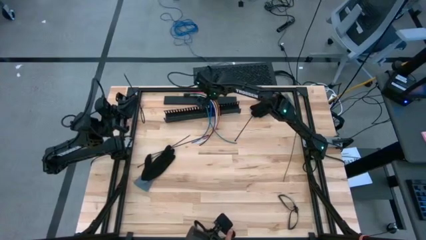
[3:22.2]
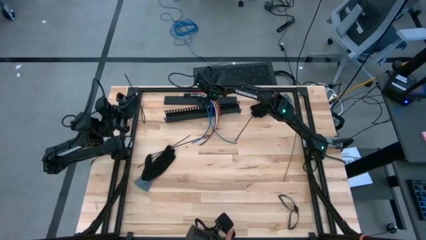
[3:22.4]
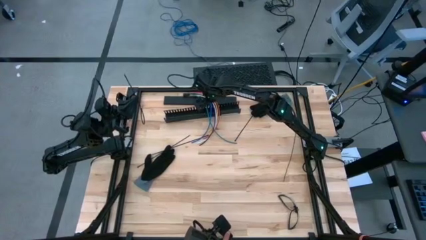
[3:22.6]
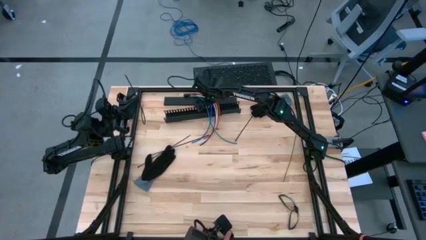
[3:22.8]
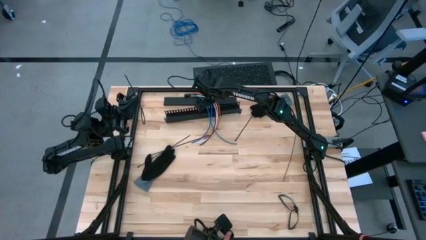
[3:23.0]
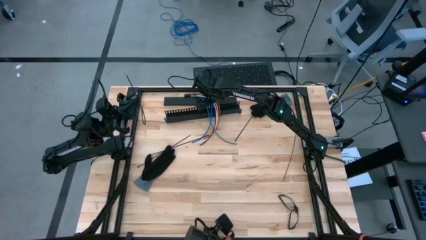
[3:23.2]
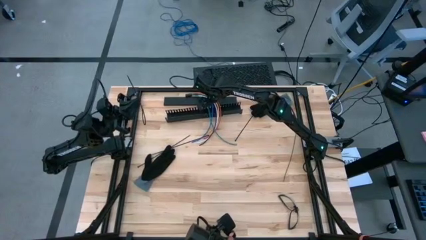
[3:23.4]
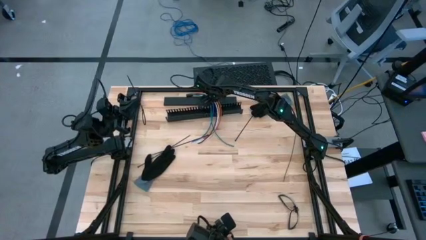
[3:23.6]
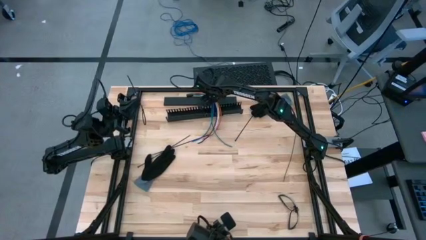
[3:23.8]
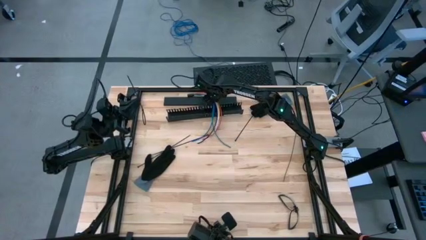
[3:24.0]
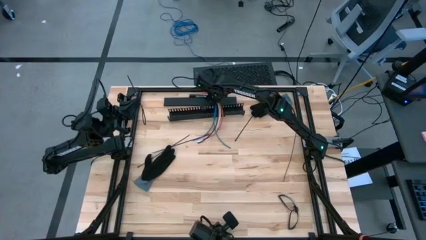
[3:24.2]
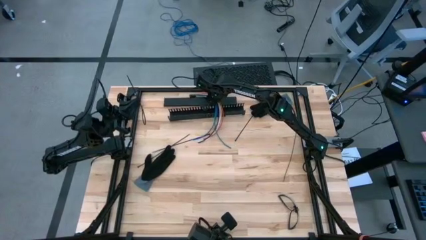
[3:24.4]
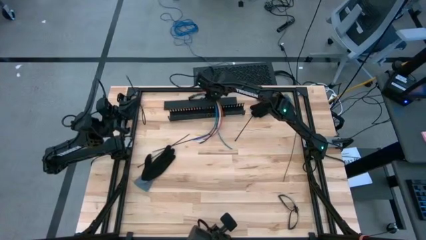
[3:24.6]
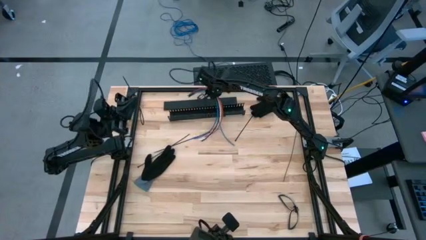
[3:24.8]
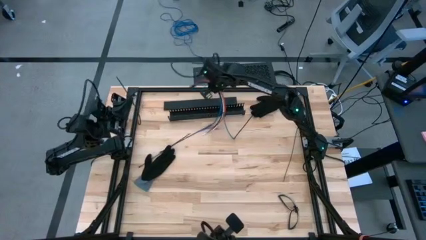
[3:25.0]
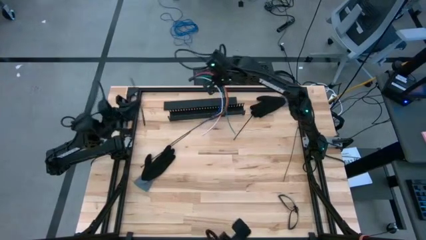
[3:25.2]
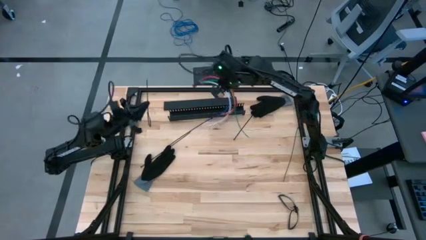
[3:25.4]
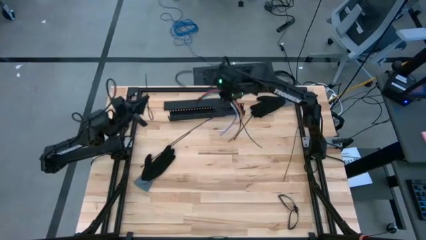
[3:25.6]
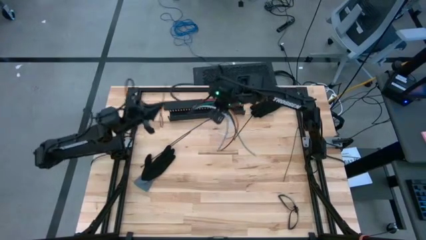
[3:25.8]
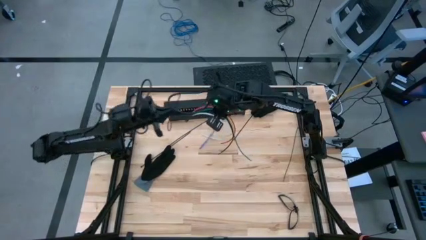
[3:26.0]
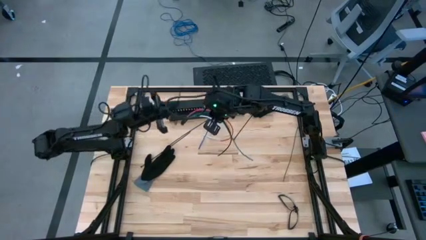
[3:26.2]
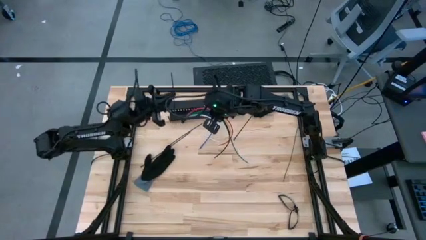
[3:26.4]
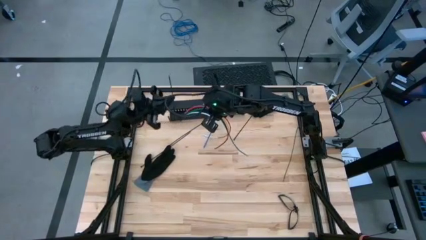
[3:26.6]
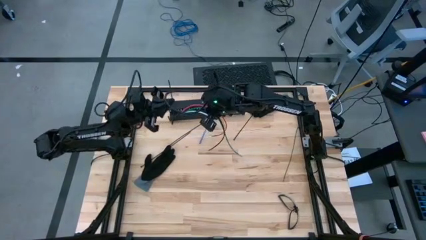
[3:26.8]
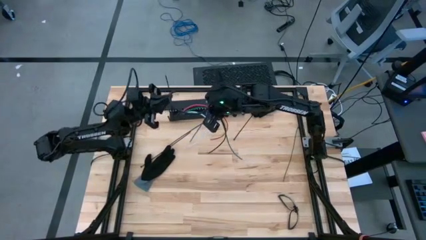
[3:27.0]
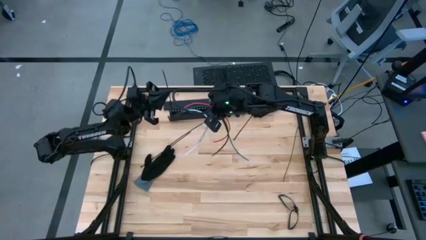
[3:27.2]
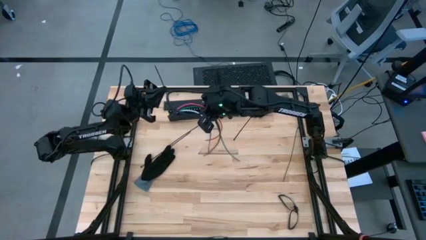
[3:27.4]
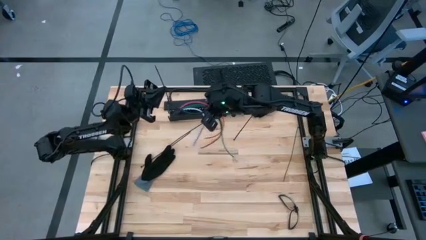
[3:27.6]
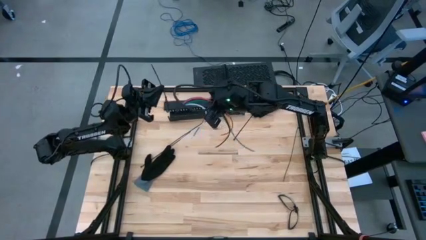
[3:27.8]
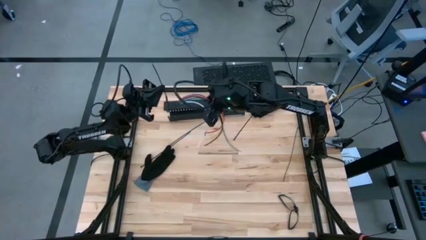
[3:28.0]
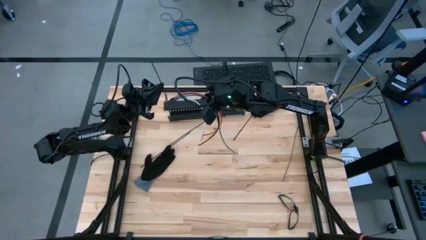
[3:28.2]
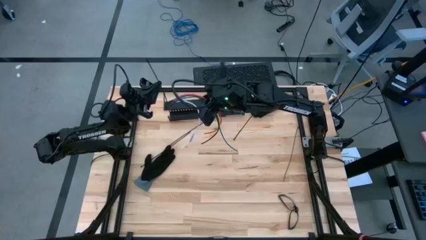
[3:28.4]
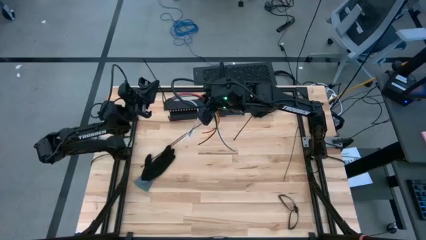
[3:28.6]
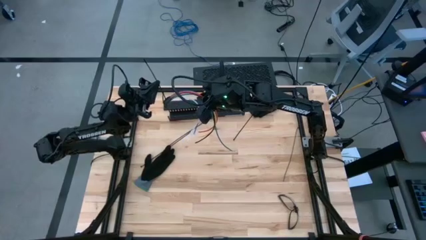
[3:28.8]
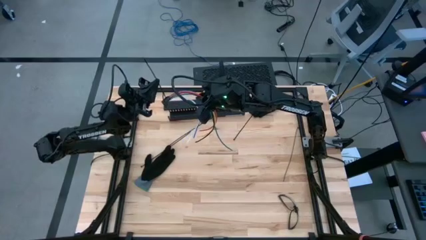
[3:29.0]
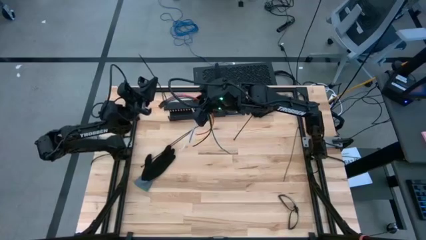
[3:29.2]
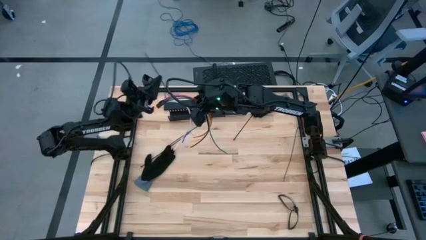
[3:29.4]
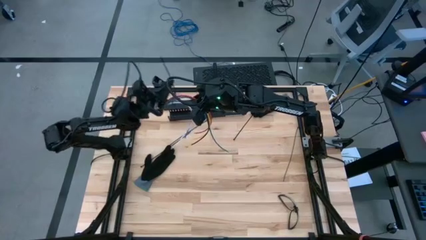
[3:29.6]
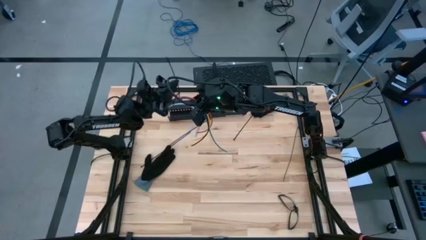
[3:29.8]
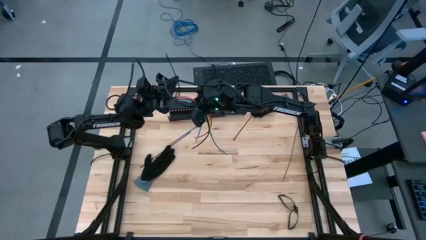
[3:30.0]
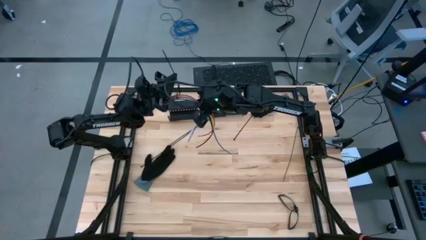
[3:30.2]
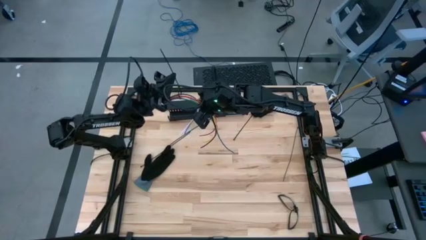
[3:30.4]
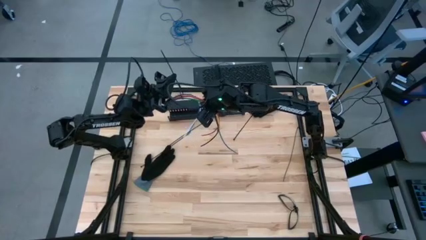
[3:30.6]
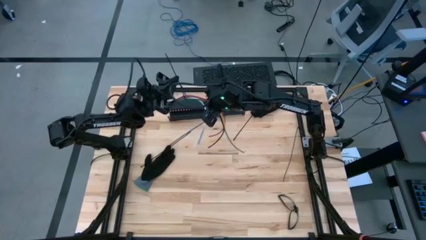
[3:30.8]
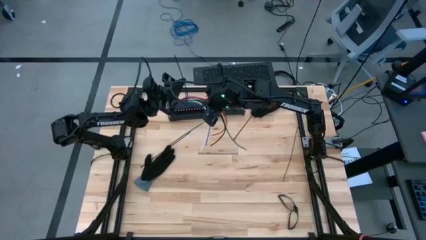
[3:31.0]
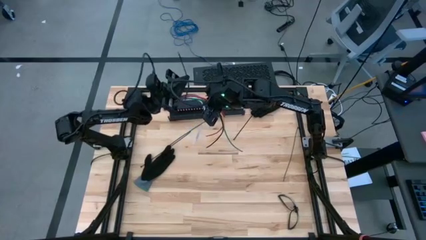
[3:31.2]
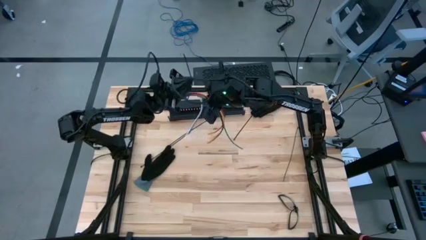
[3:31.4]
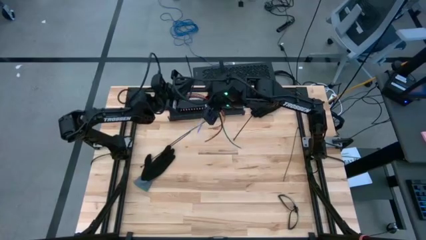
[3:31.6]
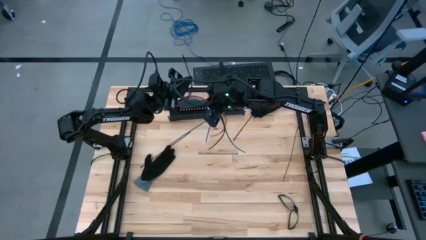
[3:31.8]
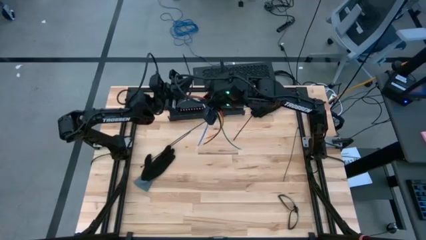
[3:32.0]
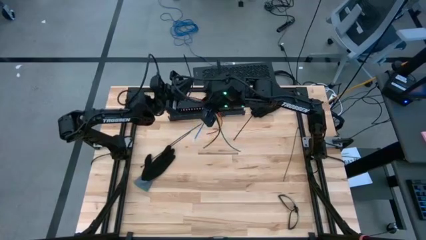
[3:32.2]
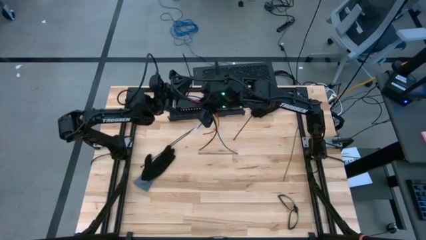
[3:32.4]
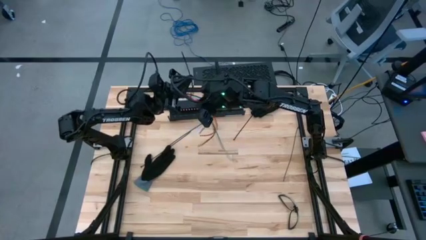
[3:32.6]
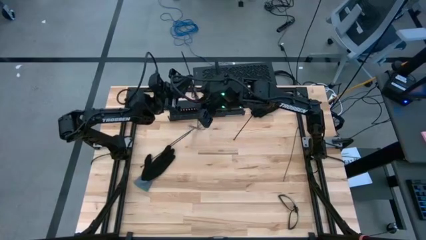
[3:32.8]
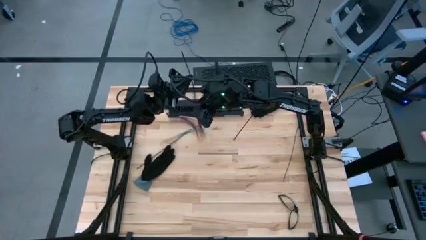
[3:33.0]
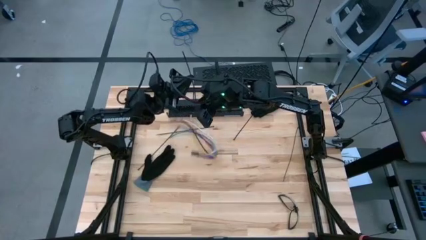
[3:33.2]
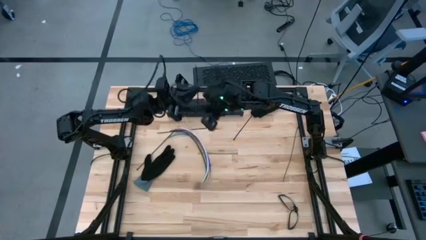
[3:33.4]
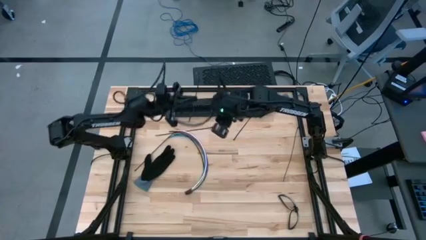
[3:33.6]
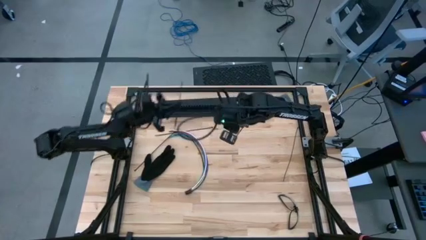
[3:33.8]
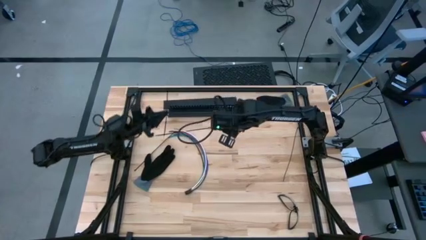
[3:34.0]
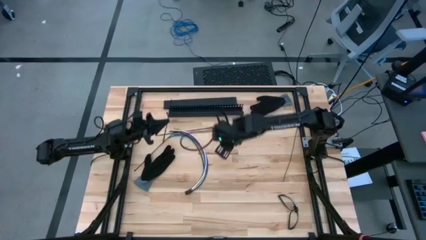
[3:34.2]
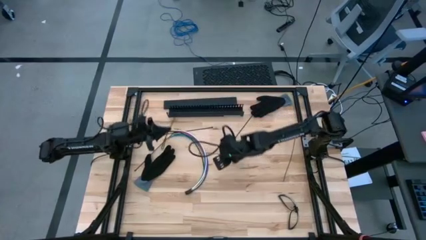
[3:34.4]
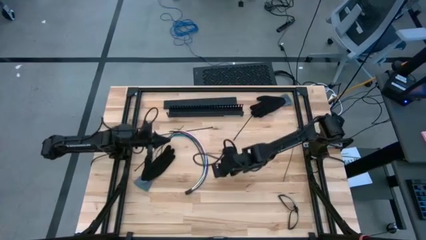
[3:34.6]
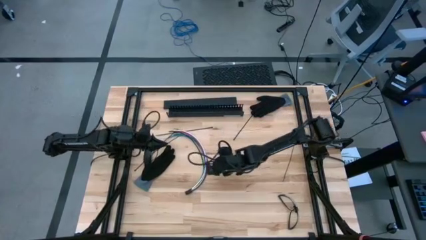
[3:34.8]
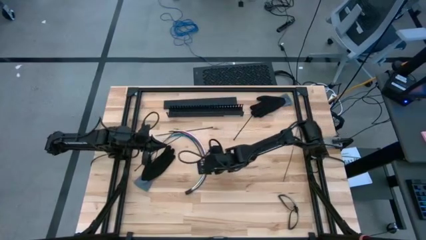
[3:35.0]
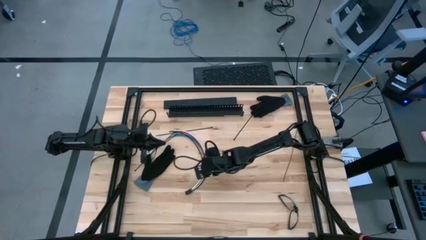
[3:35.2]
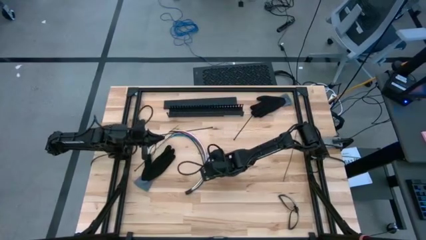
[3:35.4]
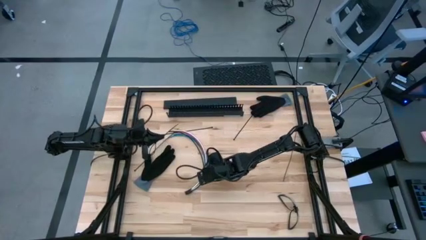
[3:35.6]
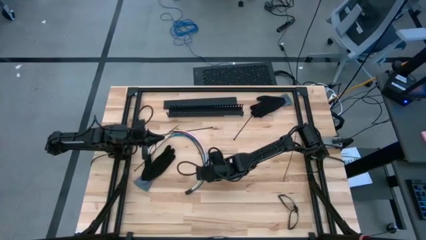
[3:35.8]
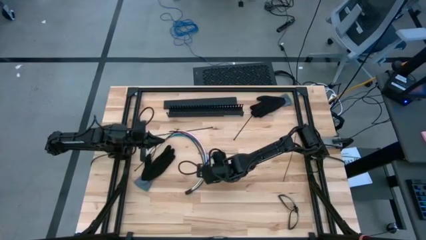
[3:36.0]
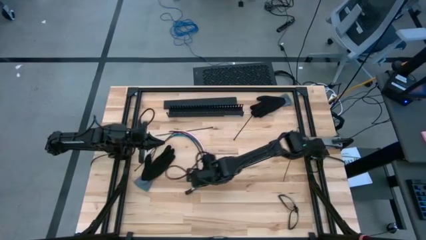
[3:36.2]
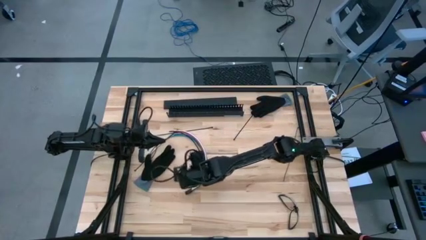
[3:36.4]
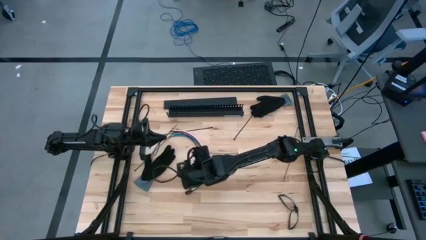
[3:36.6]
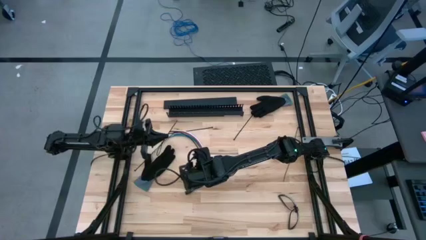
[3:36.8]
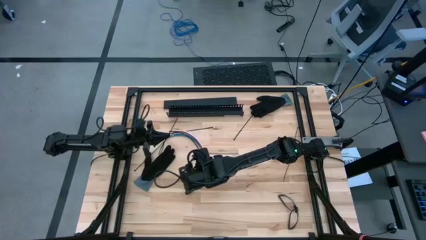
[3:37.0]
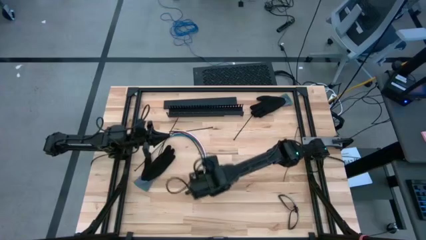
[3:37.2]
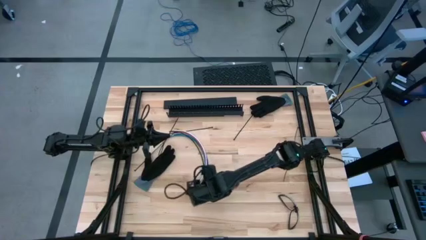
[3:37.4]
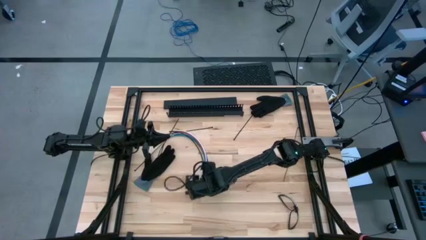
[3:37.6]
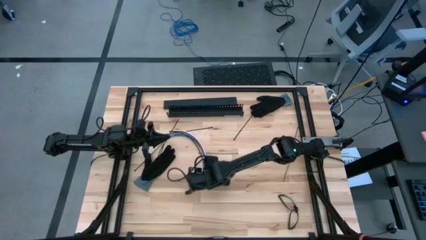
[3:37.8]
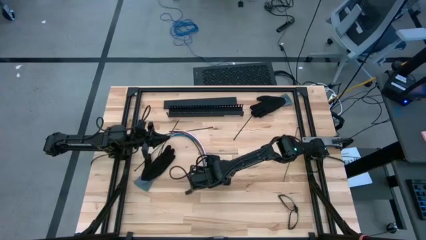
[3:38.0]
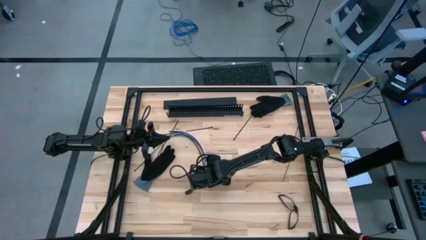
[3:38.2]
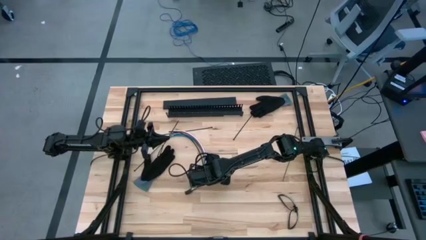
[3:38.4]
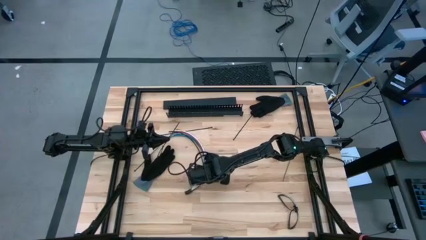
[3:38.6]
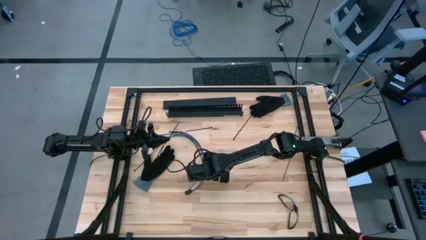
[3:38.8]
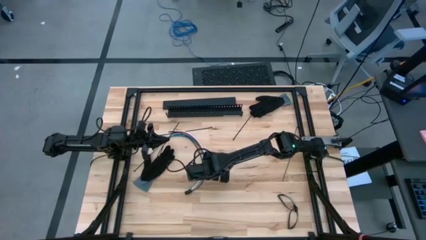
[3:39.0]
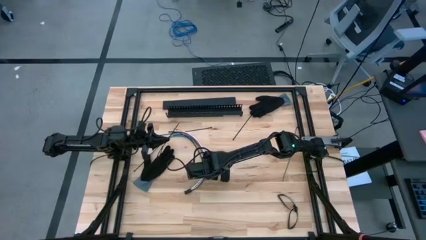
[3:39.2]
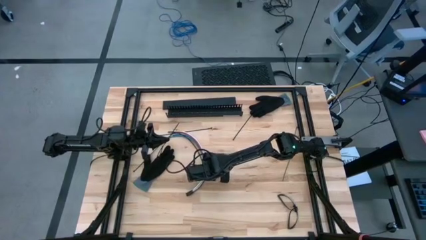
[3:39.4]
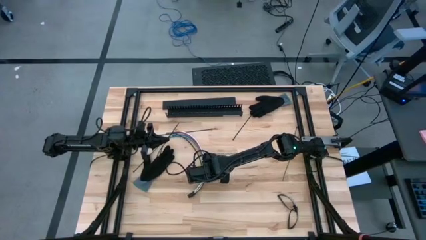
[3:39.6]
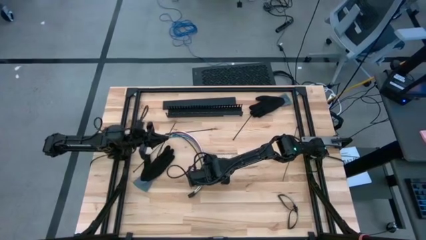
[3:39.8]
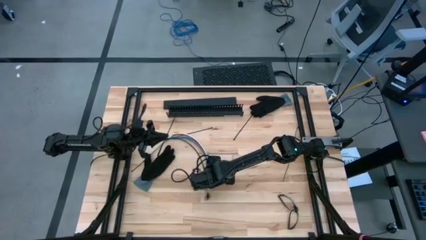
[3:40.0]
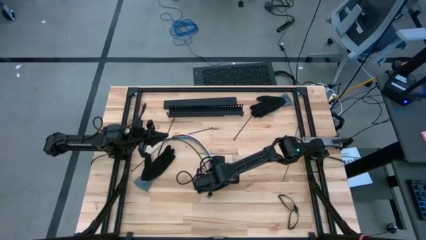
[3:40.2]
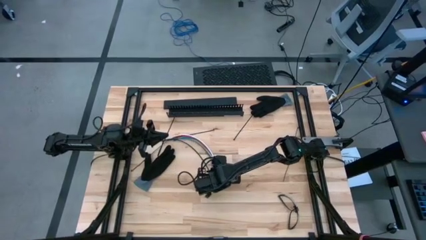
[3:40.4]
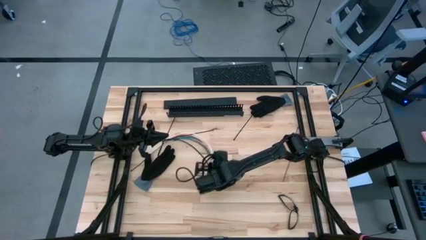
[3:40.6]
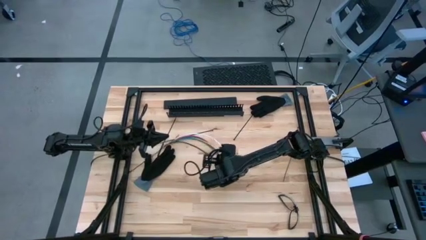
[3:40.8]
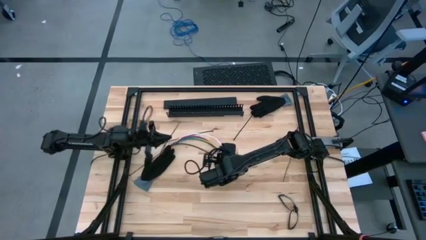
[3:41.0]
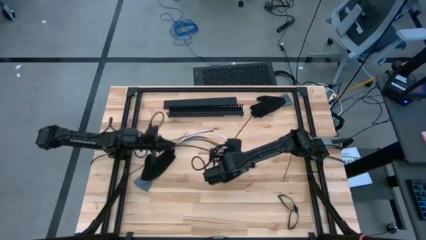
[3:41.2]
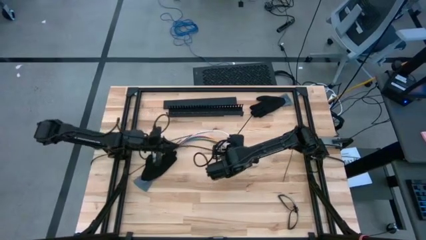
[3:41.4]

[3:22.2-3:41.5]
Task: Ziptie cables
Wrap the cable wires using a zip tie
